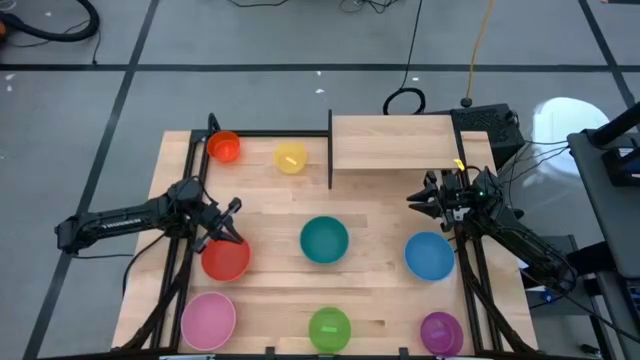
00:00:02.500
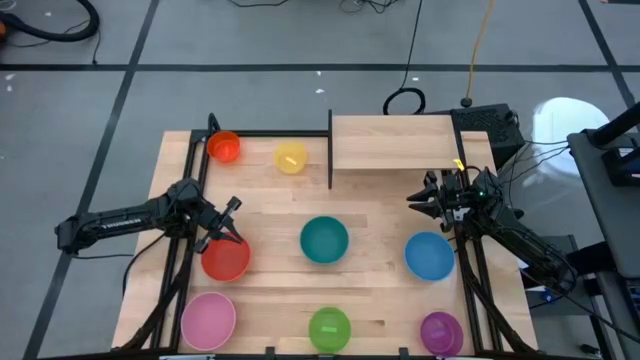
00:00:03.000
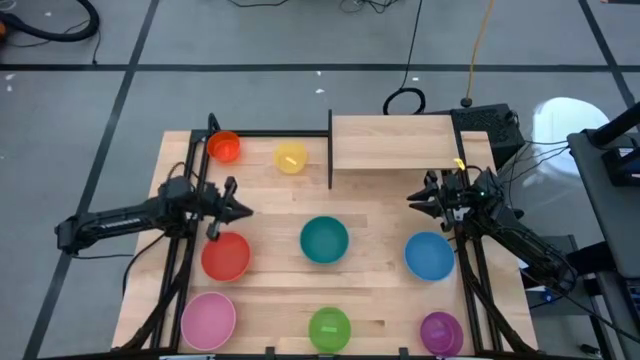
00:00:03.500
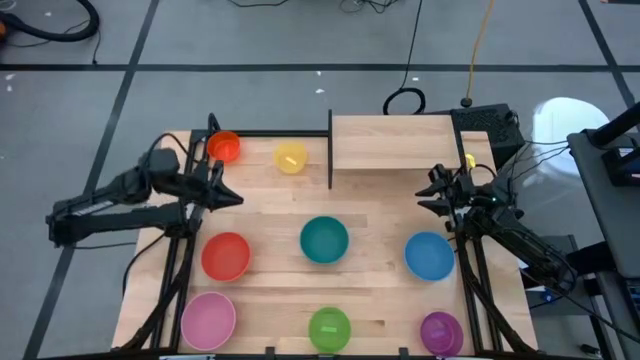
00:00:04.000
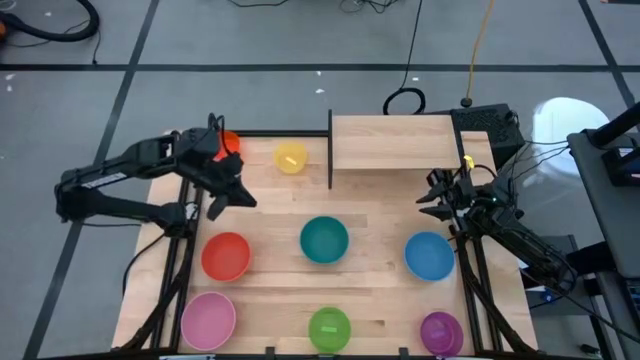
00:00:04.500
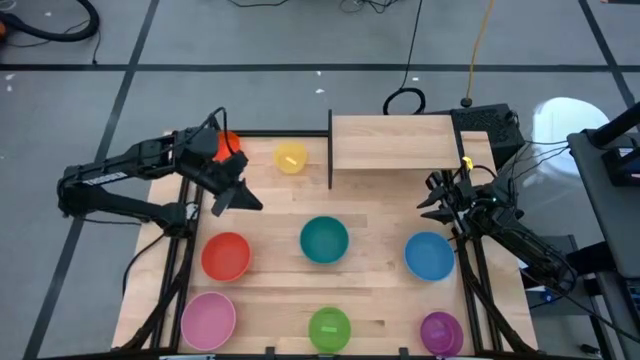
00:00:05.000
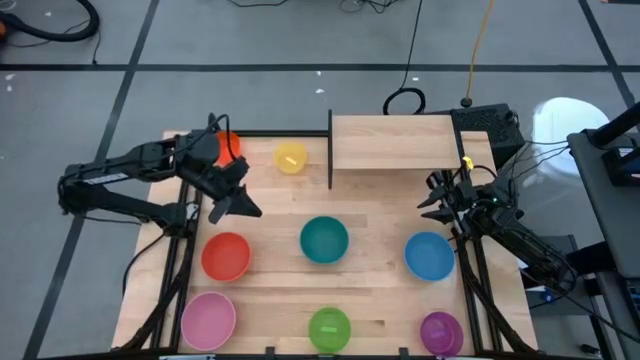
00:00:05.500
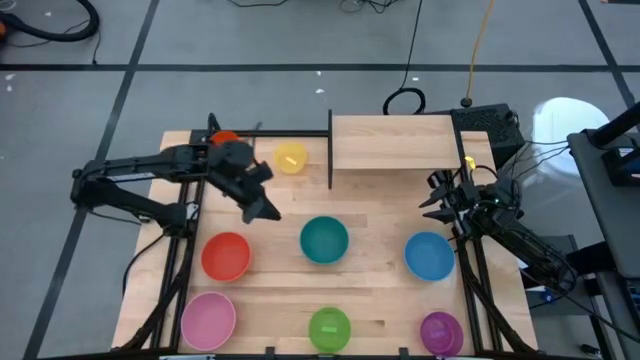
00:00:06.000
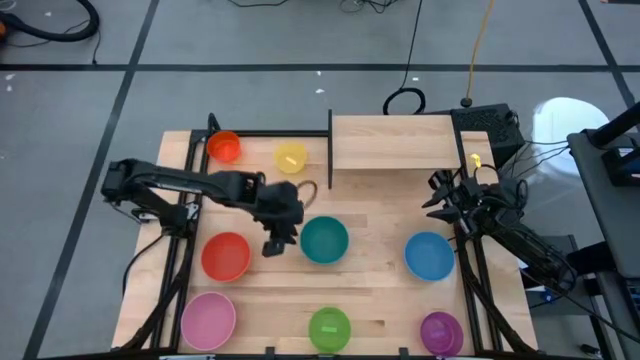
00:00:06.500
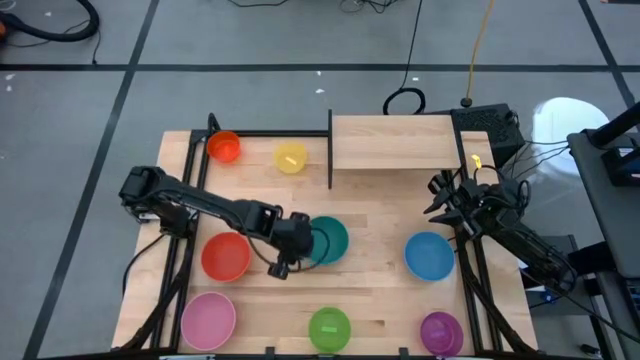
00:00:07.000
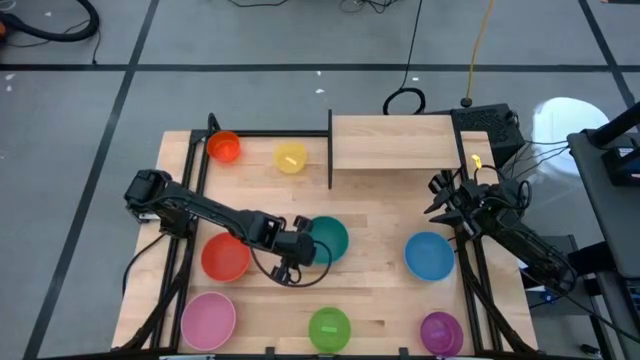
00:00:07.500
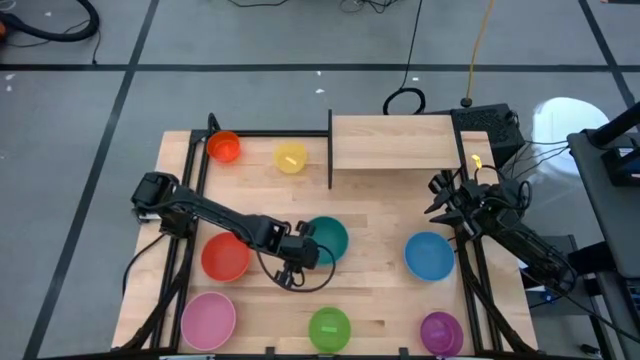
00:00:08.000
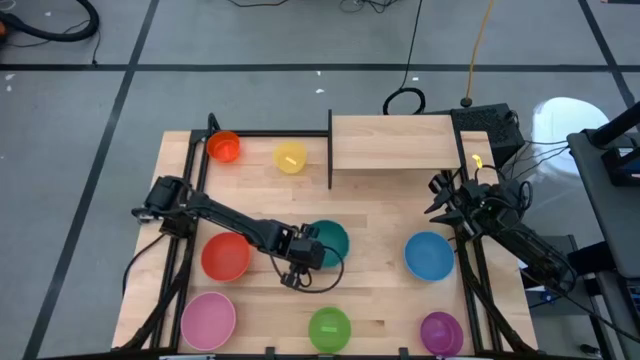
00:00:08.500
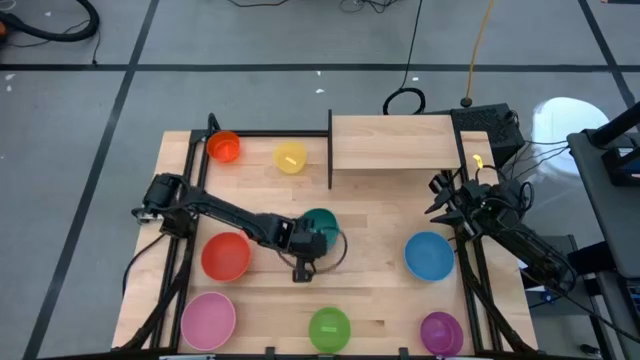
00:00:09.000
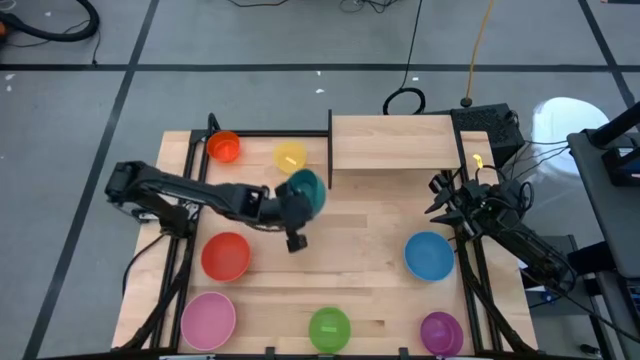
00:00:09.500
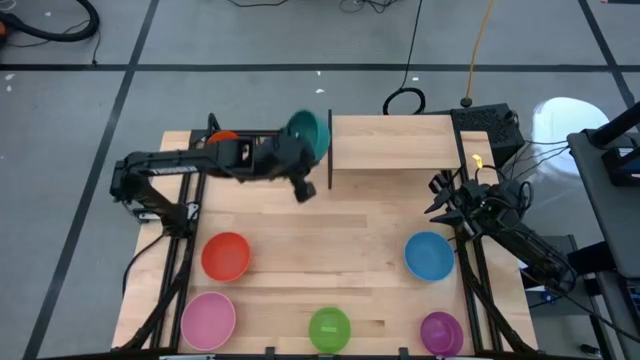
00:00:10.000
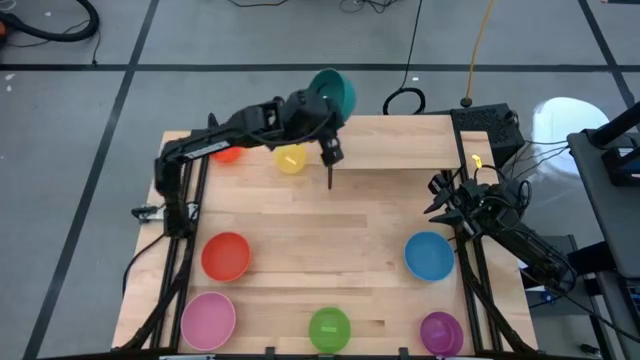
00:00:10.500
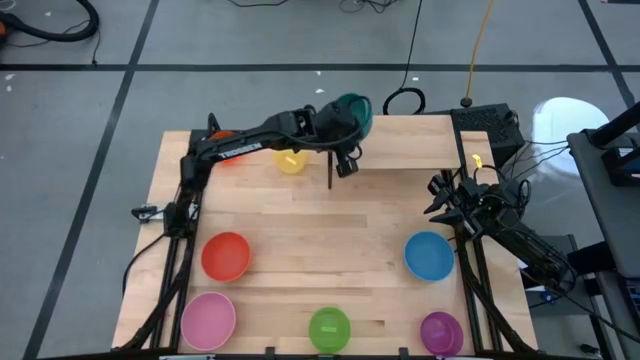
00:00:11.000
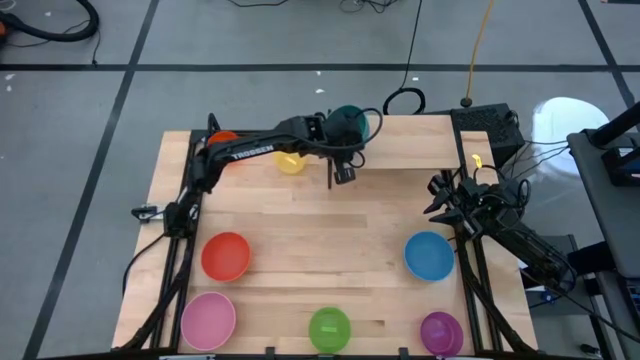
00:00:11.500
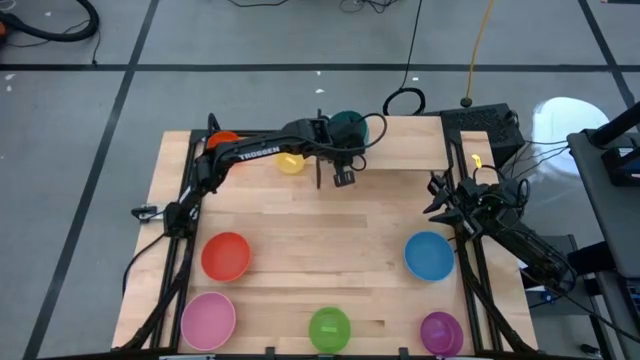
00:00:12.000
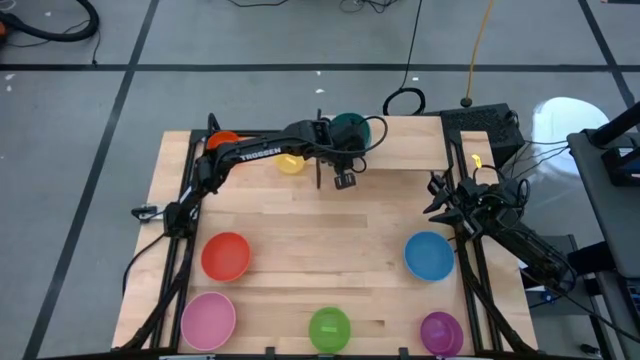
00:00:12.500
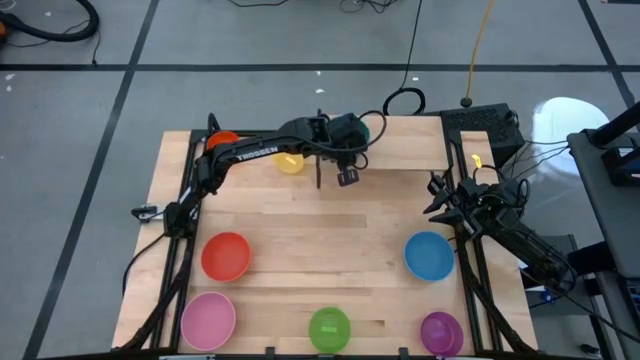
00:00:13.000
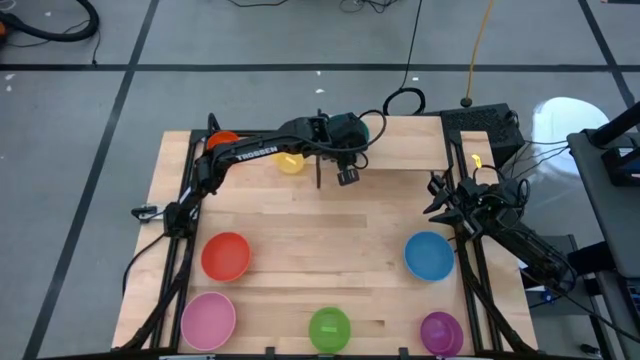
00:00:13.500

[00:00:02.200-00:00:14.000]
Task: Place and stack bowls onto a shelf
Put the dark green bowl on the shelf

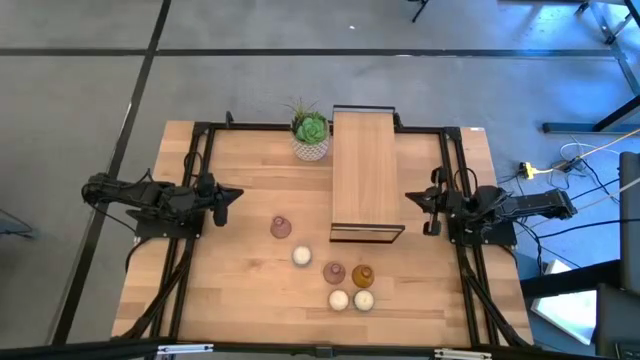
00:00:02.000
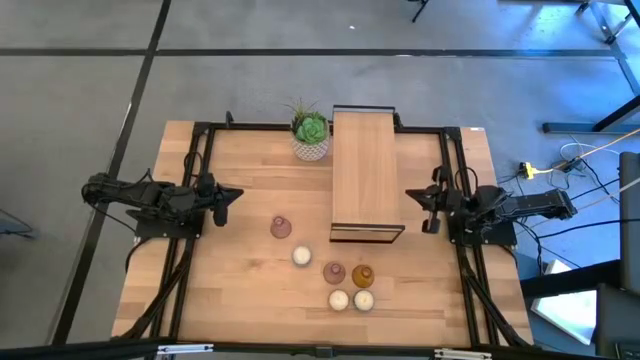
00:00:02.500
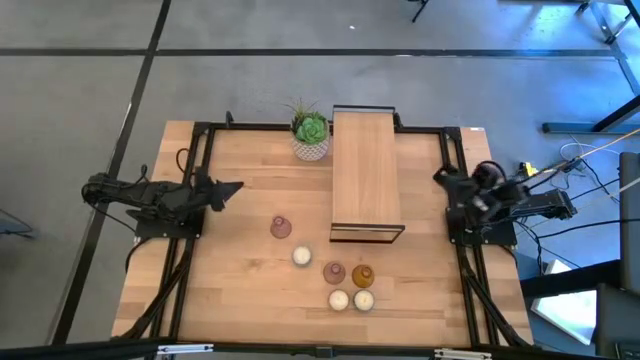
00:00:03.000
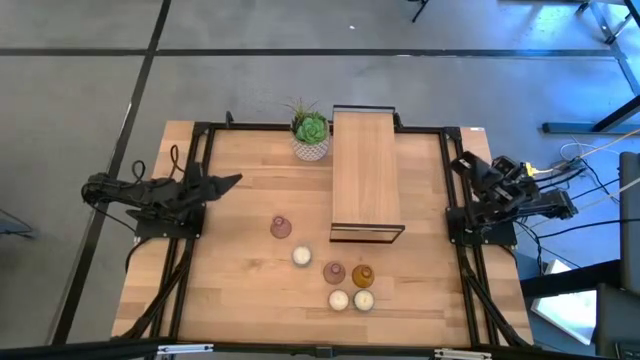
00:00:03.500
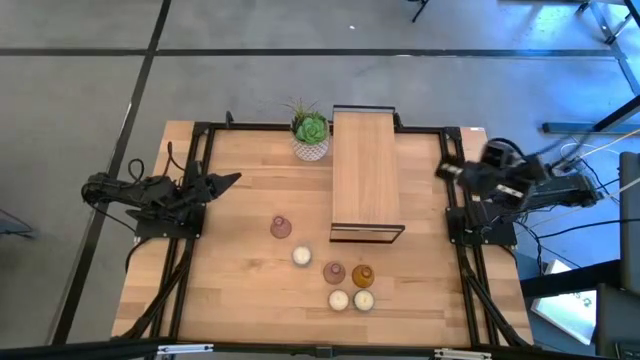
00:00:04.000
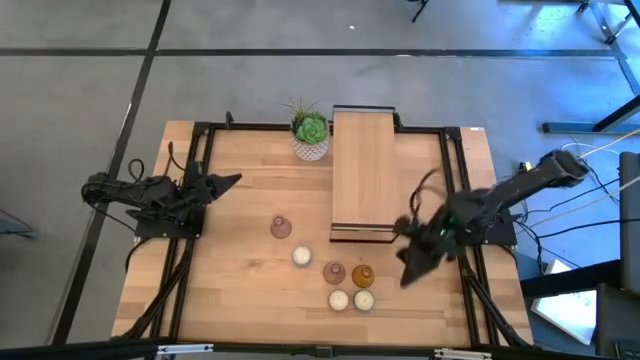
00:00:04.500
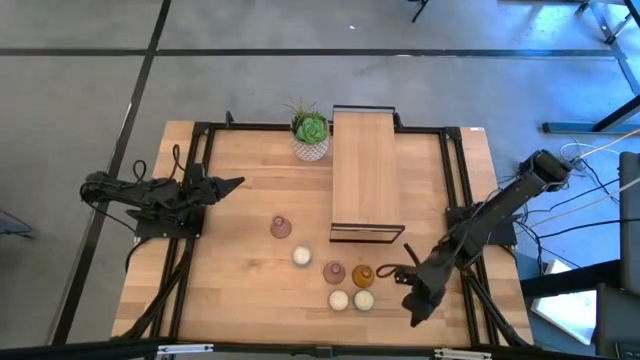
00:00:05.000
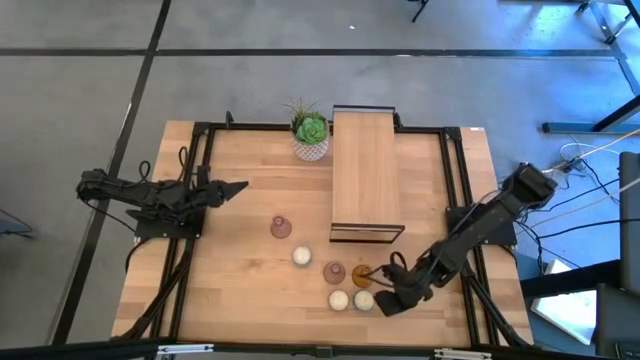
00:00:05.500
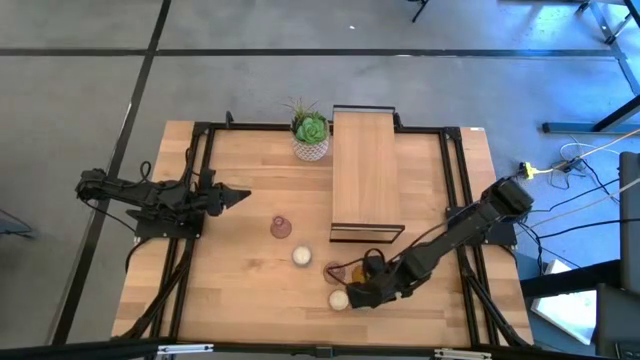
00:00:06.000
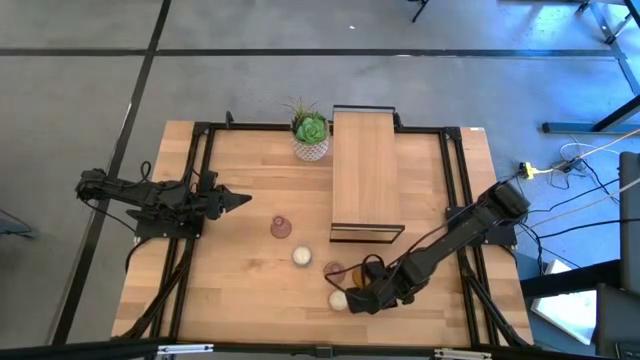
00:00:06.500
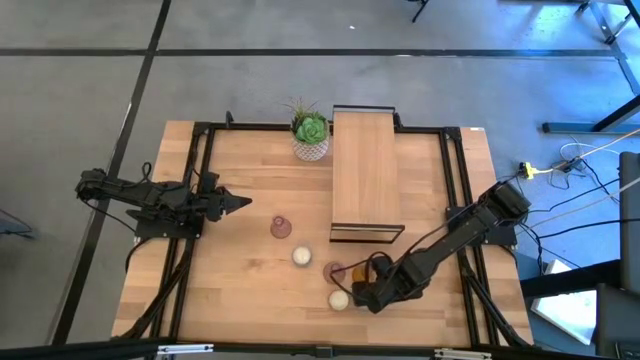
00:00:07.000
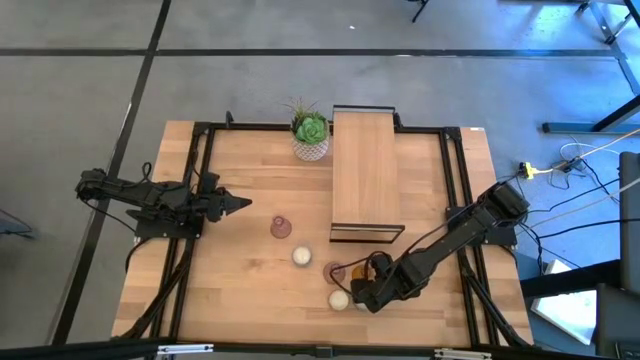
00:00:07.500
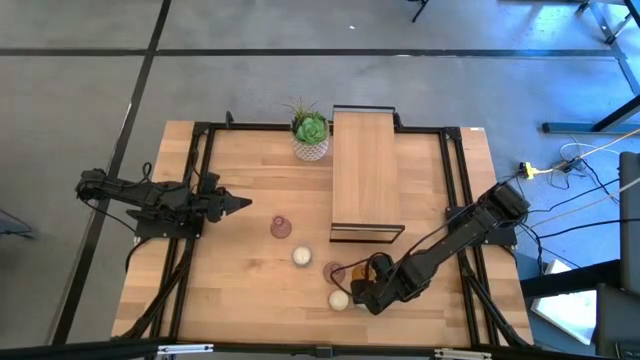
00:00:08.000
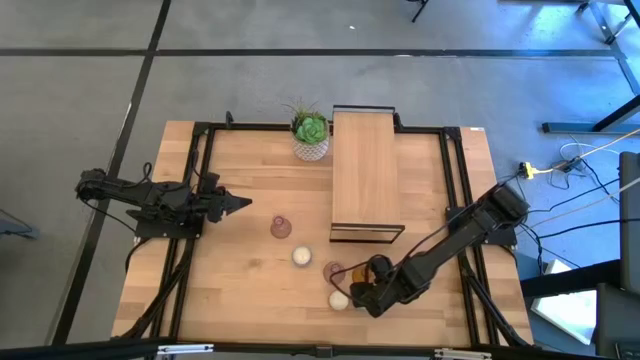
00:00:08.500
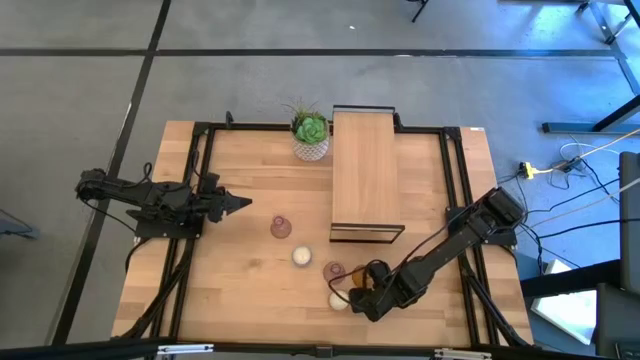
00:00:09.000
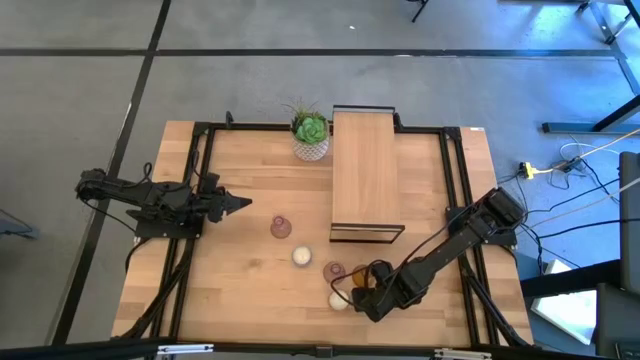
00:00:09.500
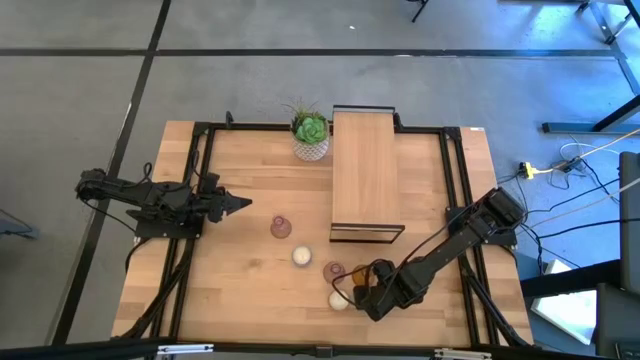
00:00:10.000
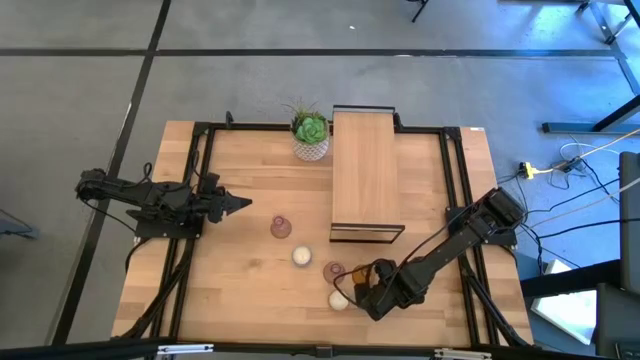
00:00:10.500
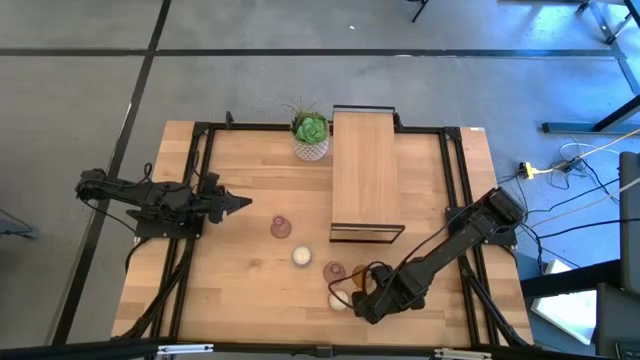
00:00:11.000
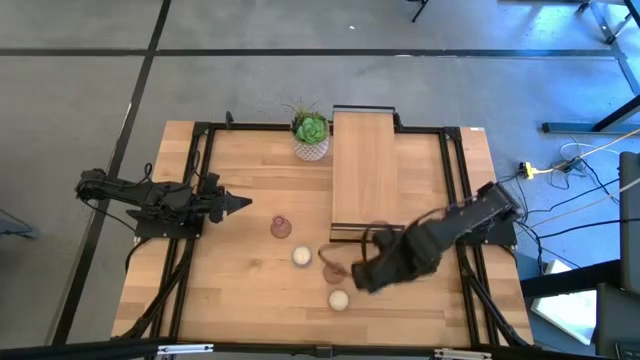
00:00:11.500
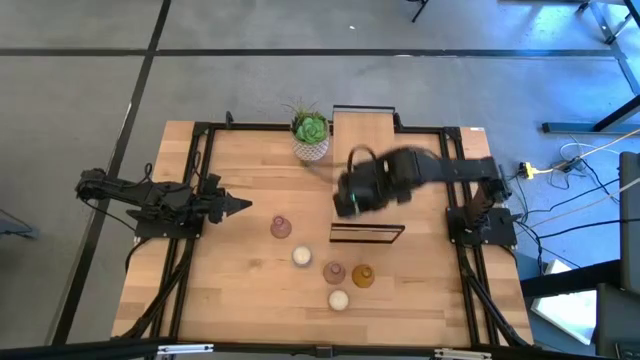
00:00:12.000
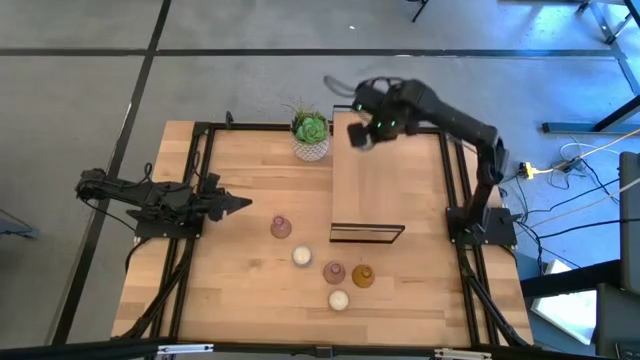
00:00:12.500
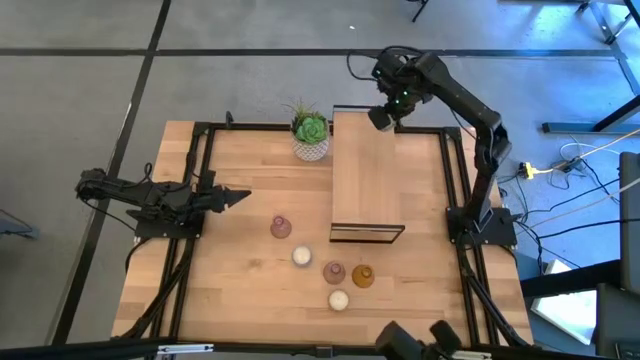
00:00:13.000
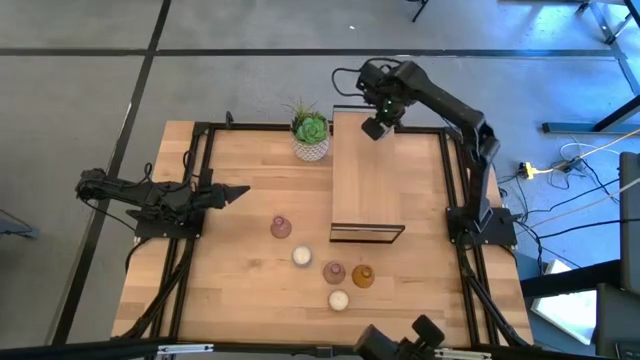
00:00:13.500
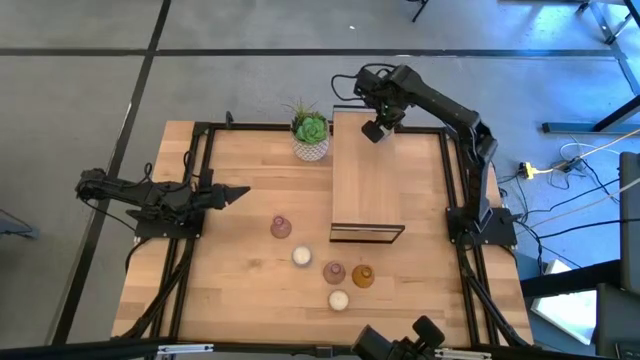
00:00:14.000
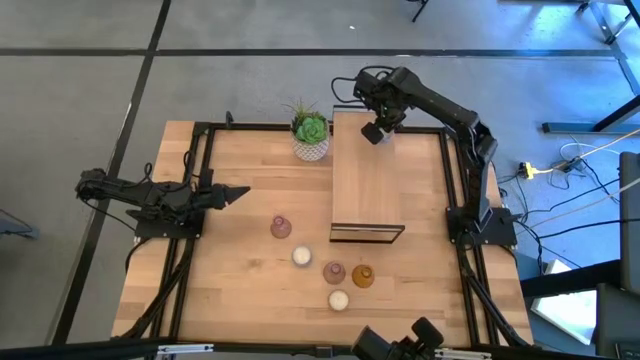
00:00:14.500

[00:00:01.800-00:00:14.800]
Task: Pick & Place candle stick holders
Put the bottom patterned blue scented candle on the shelf
